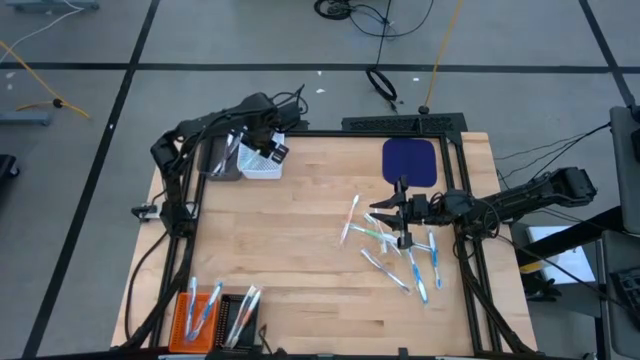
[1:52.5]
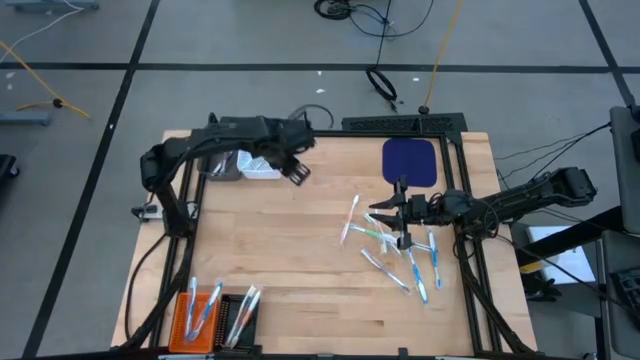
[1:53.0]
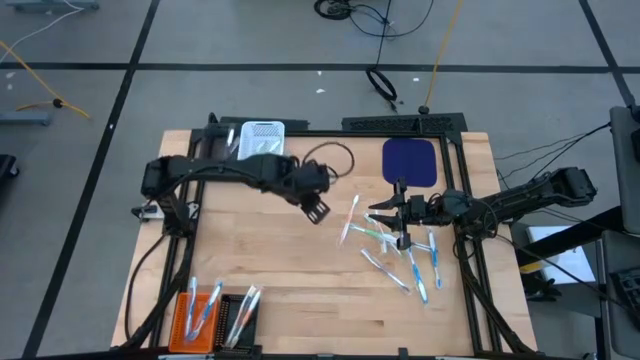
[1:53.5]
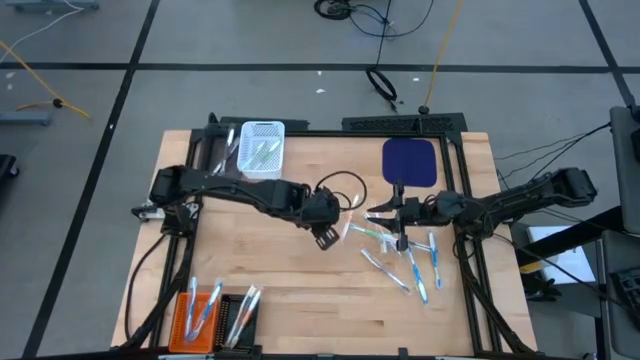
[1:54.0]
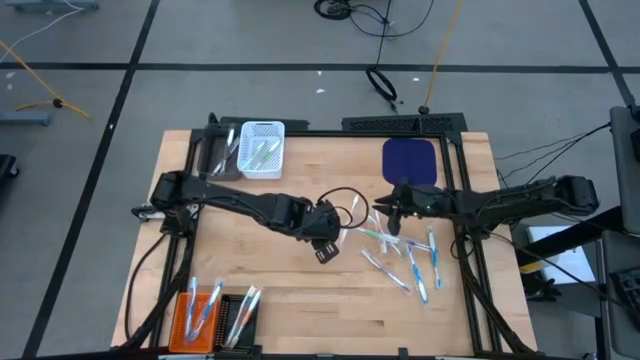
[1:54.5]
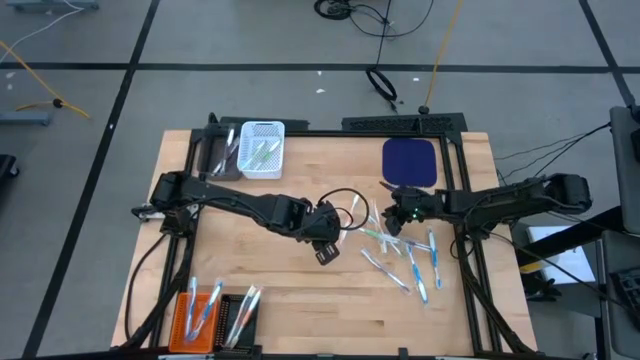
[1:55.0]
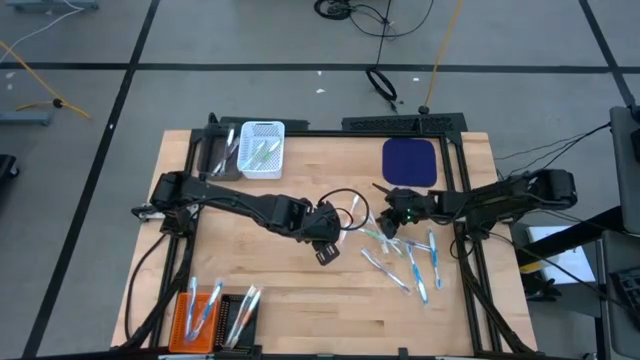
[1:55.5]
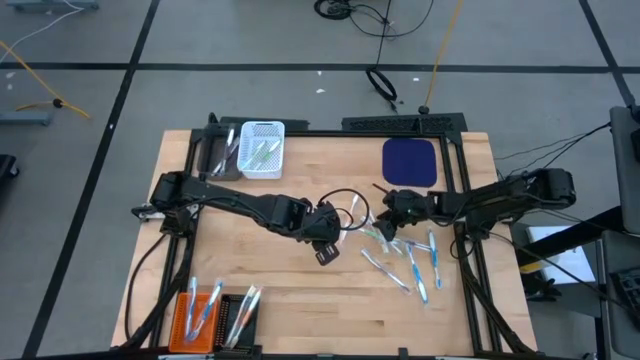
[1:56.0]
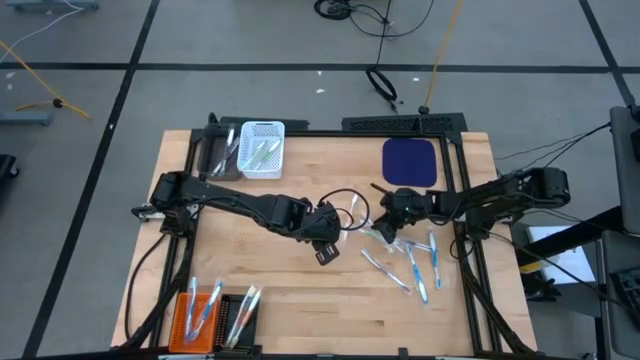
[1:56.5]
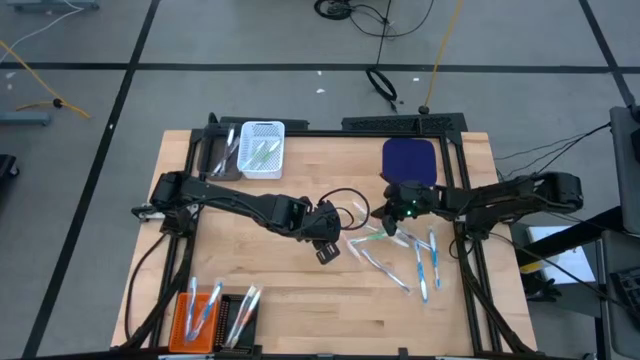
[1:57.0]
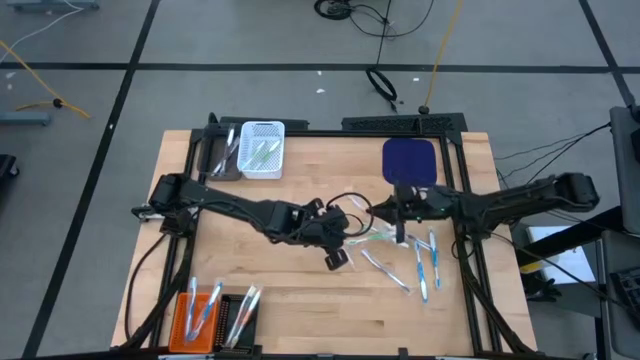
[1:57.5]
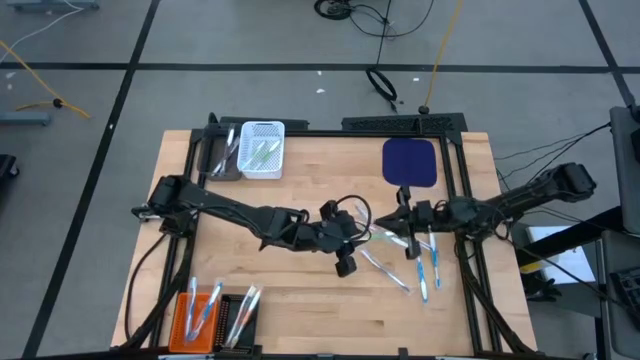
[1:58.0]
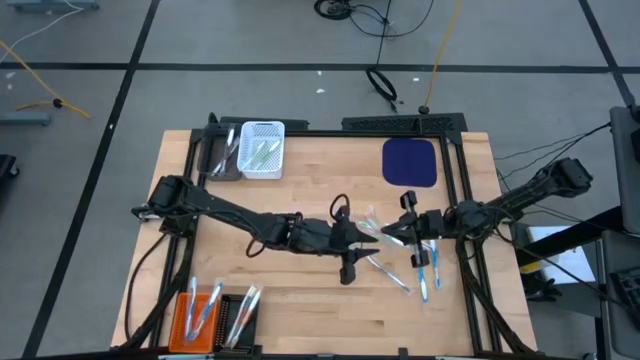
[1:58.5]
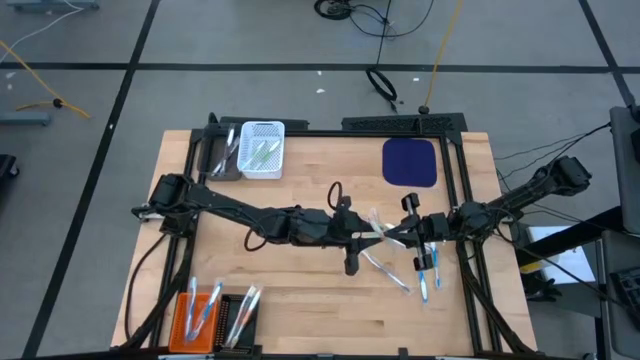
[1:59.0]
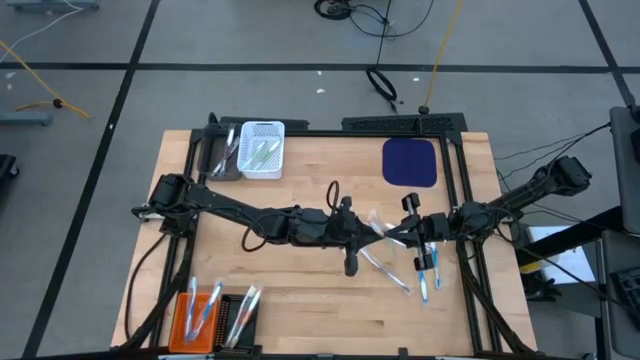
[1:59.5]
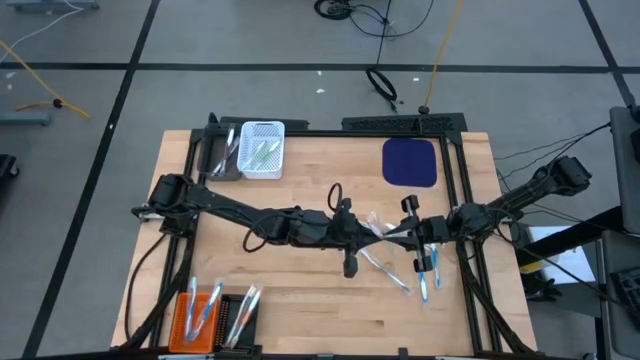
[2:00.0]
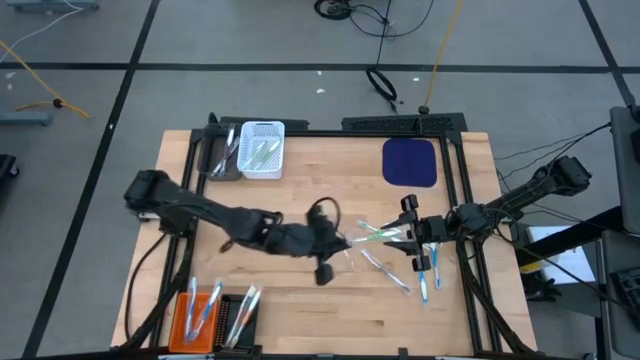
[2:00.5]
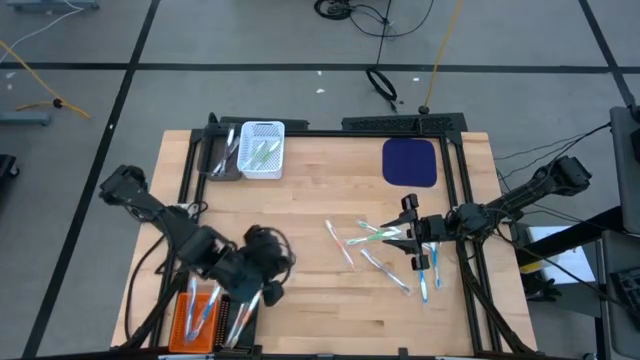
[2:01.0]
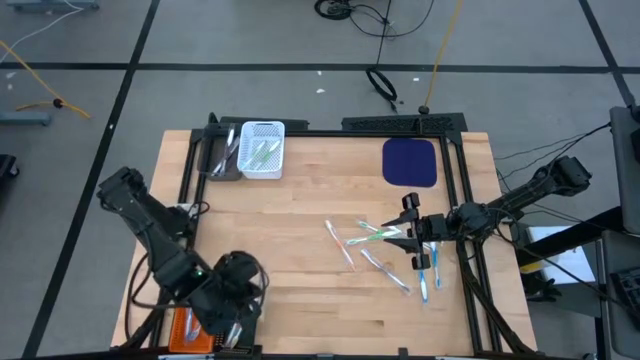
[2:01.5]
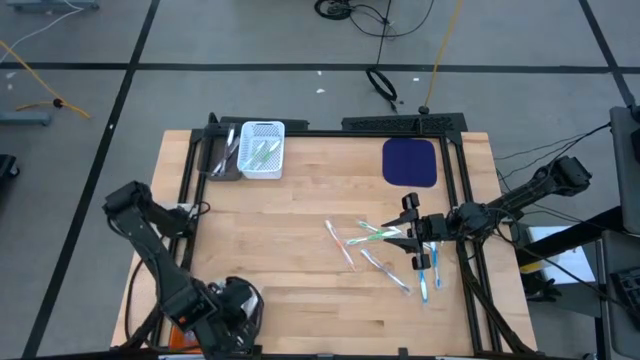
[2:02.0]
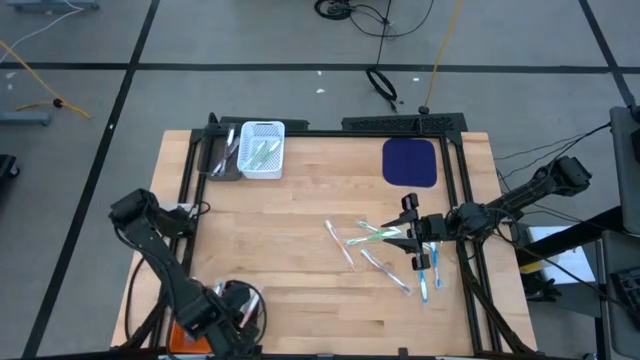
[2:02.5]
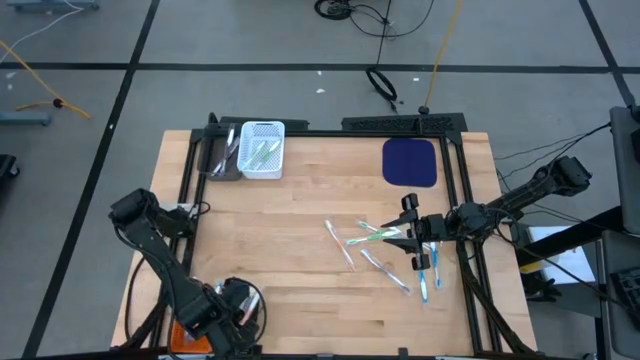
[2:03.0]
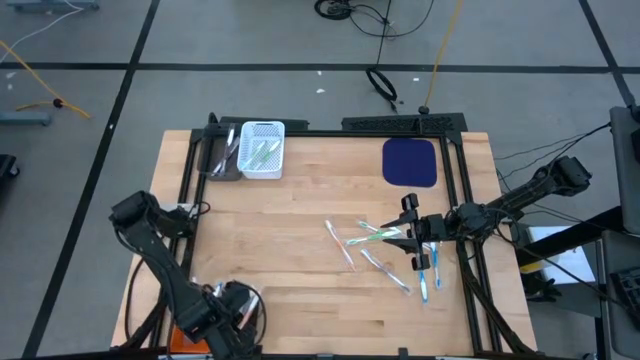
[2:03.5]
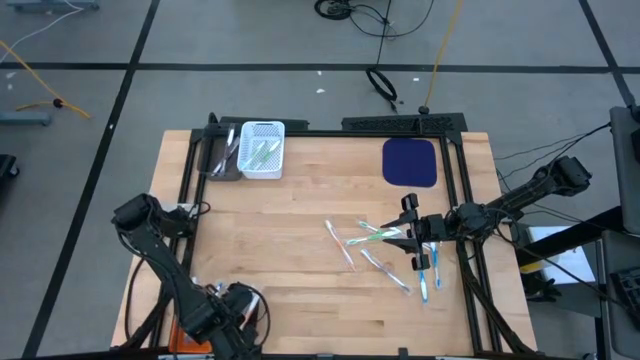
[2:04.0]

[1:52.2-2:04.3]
Task: Pick & Place Toothbrushes
Put the orange toothbrush into the black bin

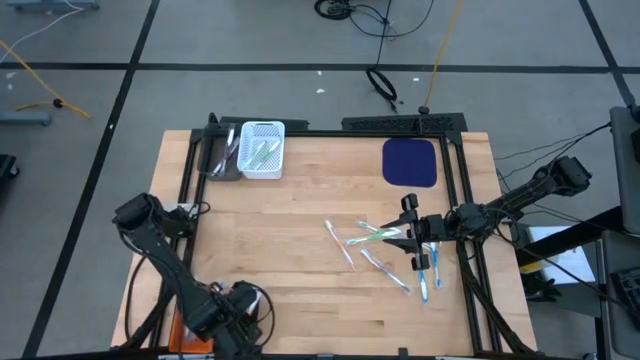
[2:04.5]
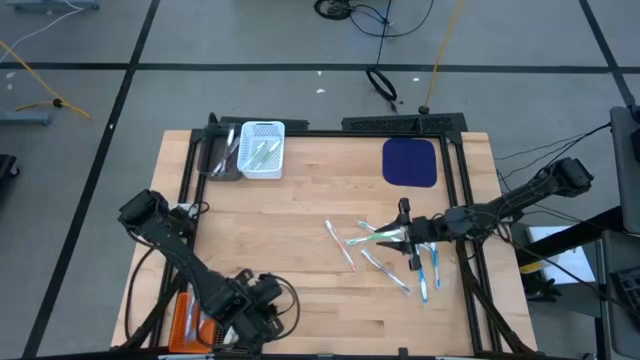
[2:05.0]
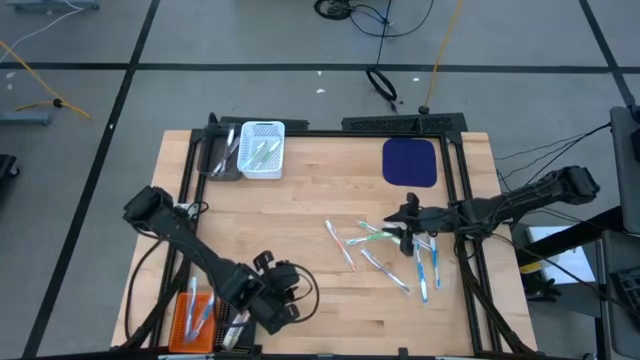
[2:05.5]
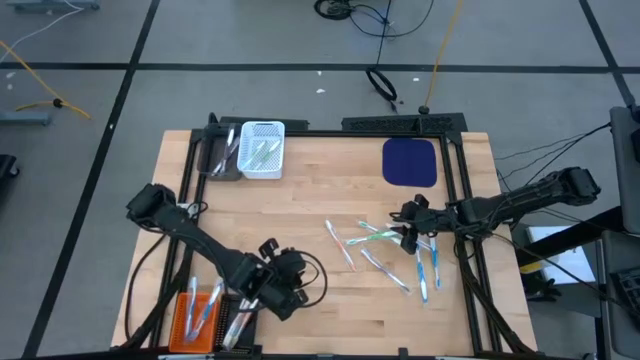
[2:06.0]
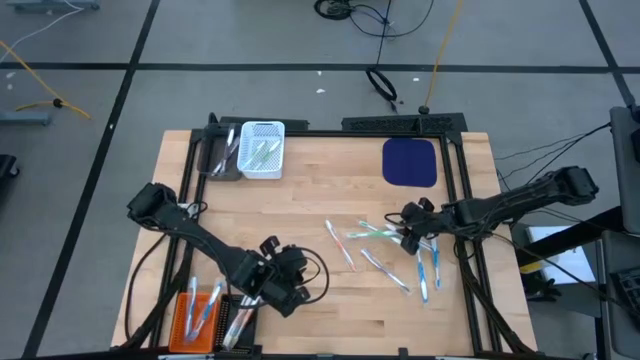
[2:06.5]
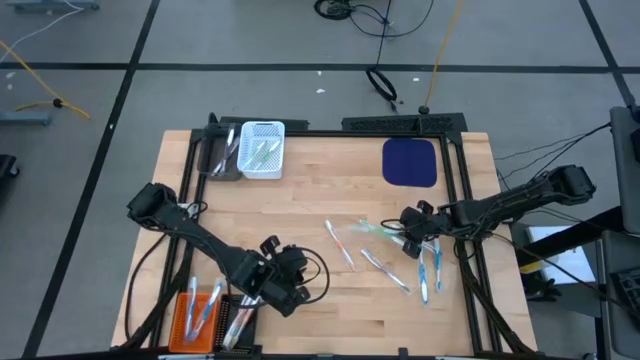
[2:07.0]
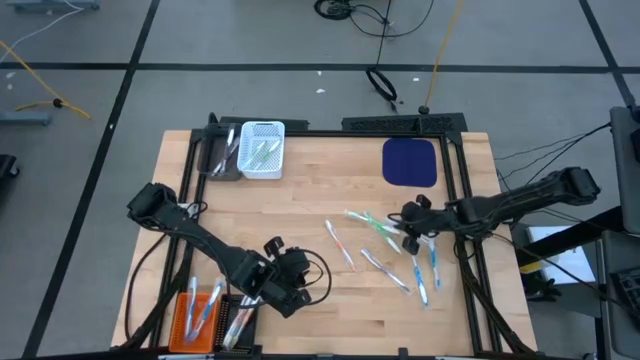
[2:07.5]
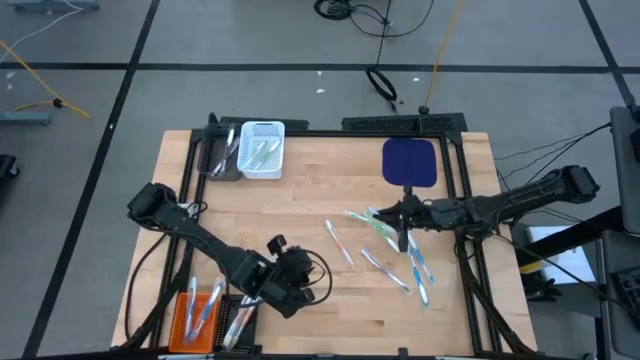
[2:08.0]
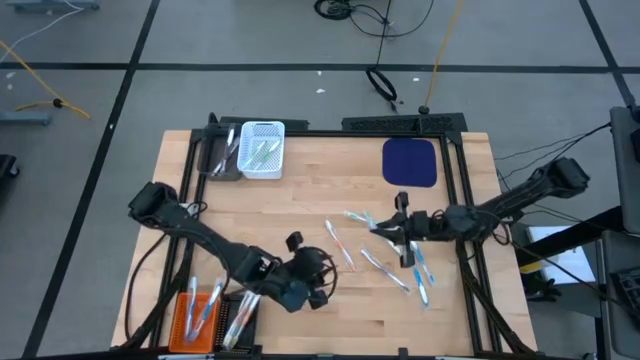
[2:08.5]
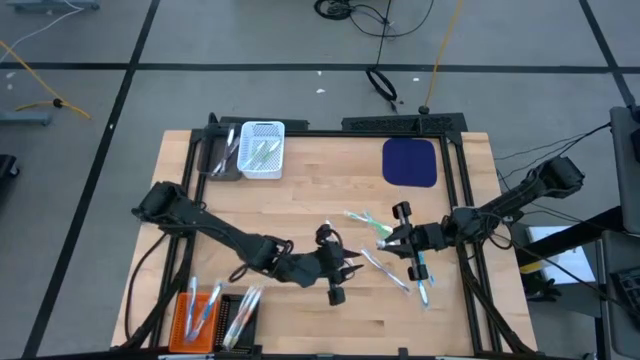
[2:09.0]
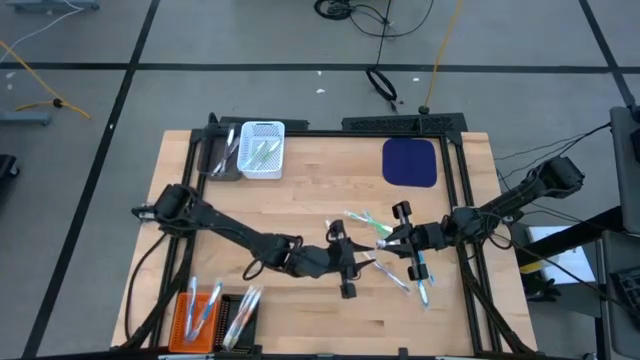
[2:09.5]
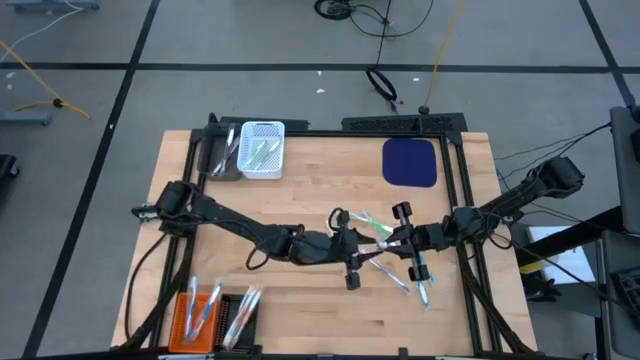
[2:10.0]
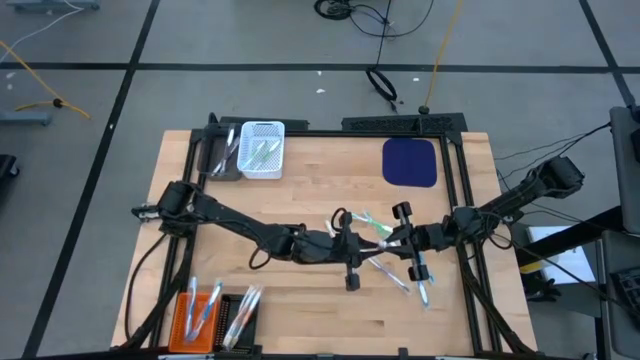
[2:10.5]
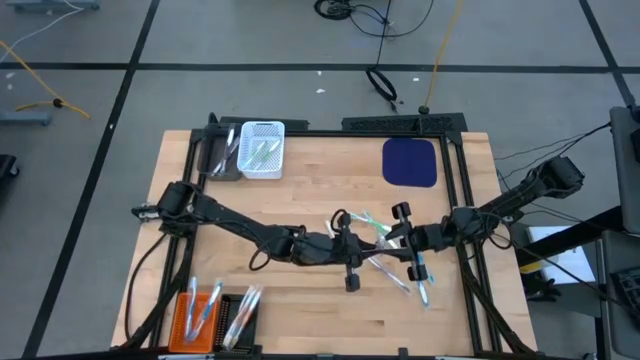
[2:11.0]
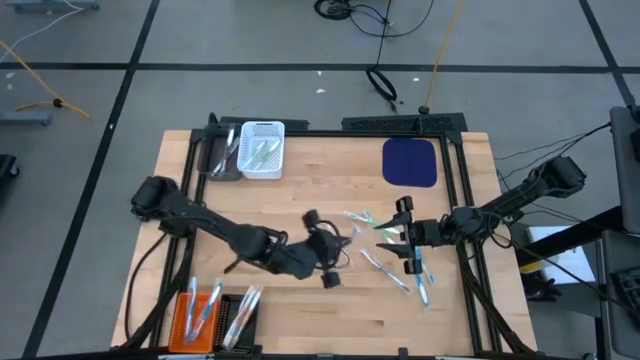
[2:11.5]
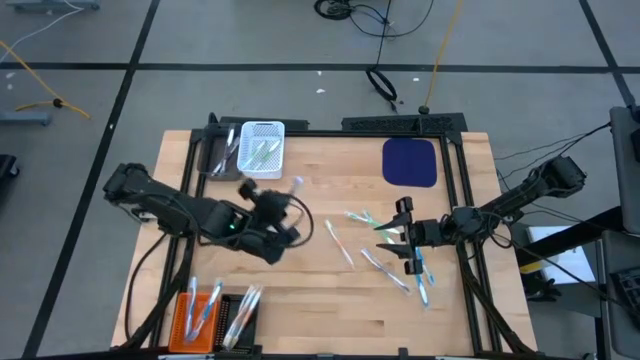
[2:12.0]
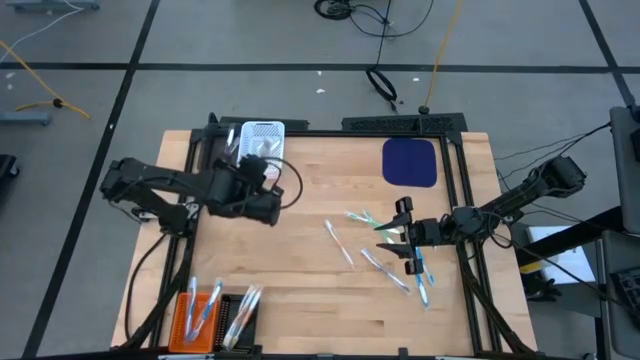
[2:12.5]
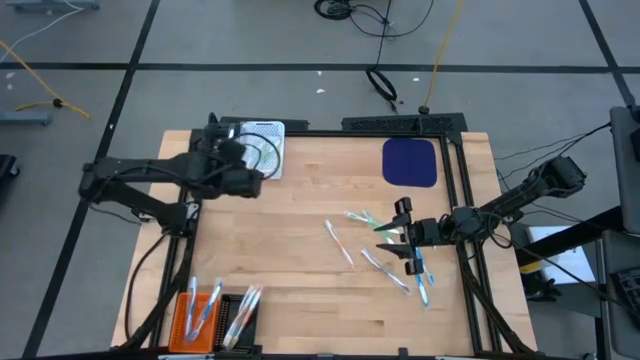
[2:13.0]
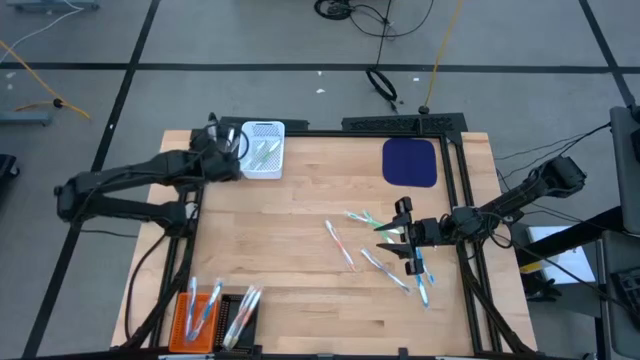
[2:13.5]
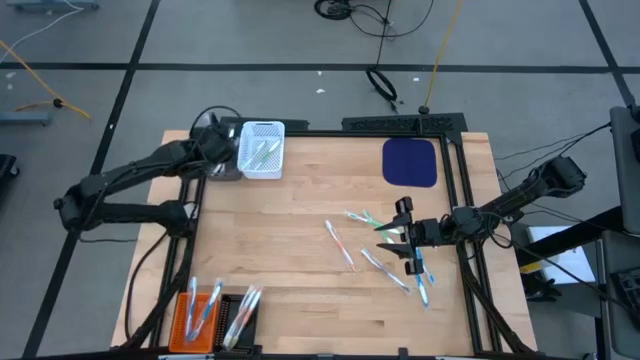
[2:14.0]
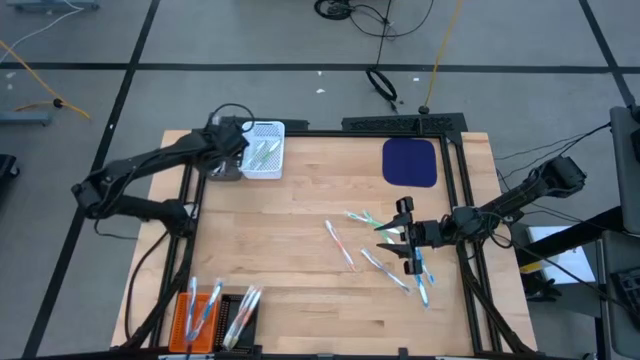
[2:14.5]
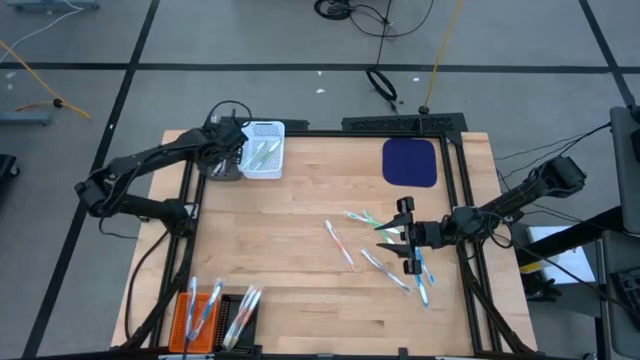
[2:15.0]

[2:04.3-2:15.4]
Put the violet toothbrush into the gray bin
